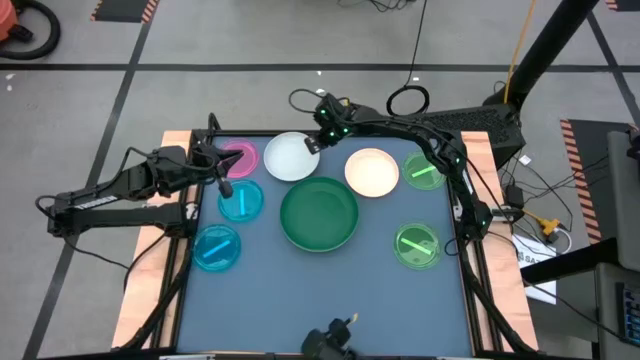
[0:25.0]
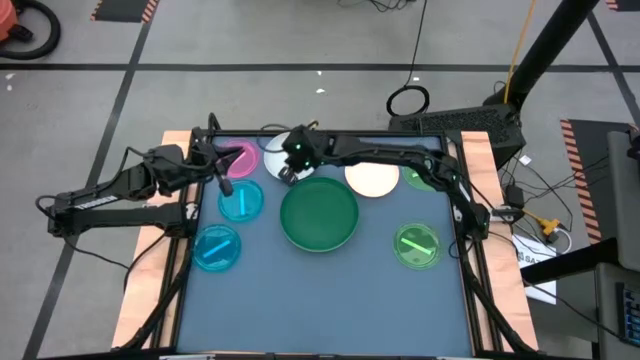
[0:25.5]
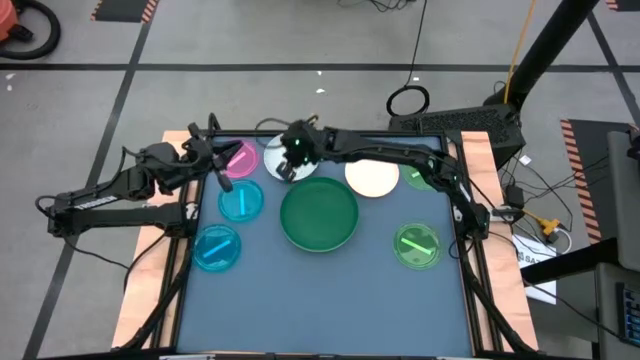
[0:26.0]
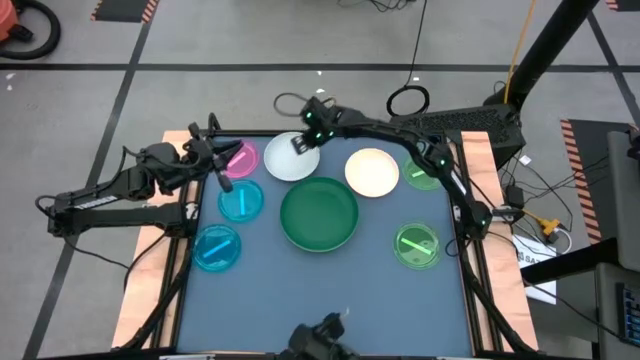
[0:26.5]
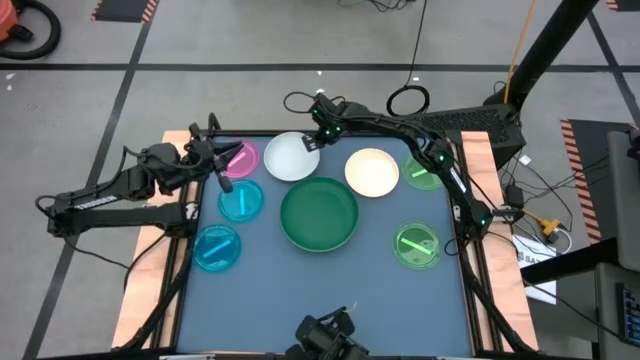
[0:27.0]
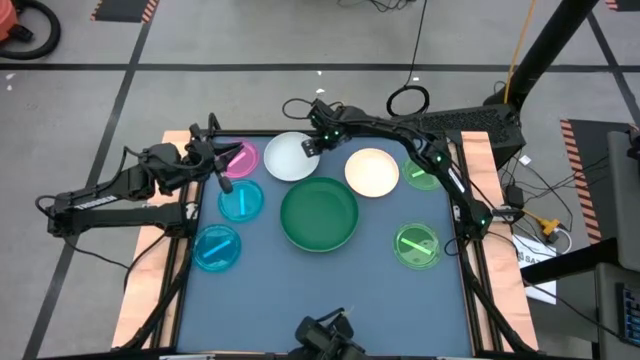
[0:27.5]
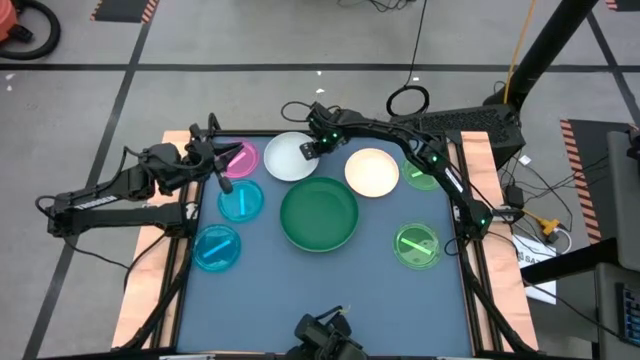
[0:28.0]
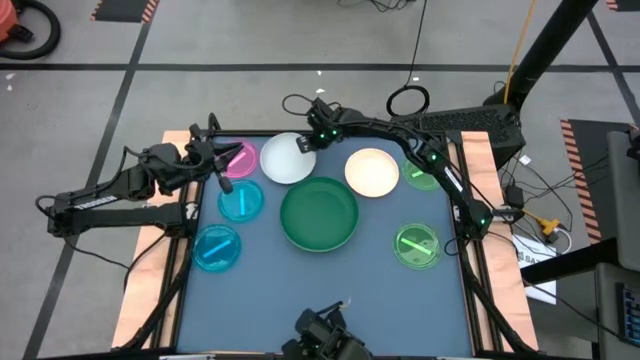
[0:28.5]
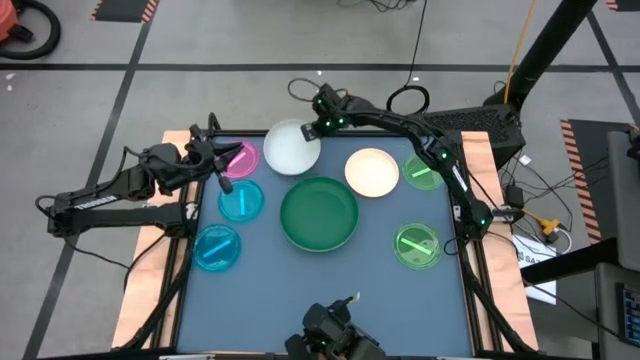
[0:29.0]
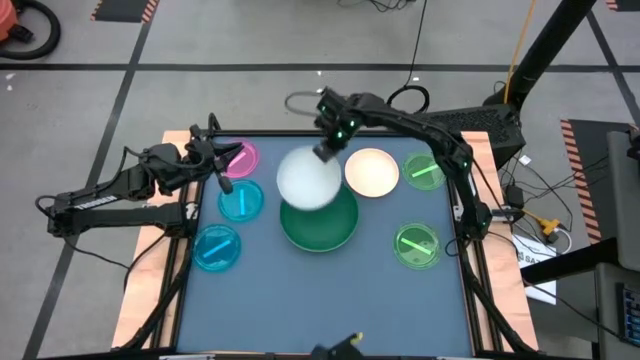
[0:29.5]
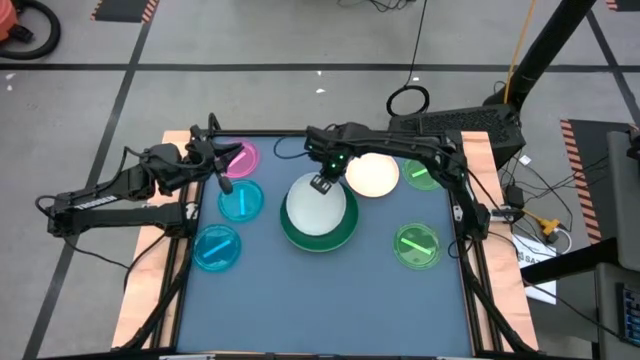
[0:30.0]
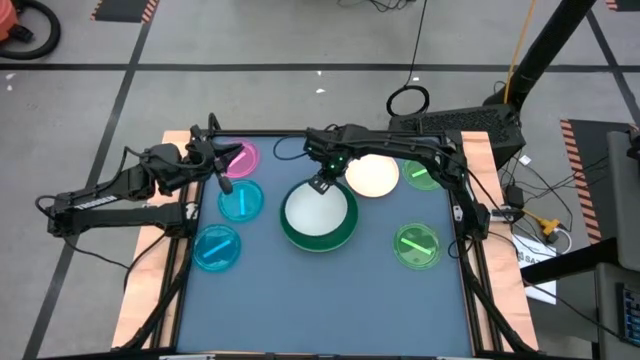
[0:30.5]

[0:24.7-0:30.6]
Task: Stack plastic plates
Stack the gray plate on top of the green plate

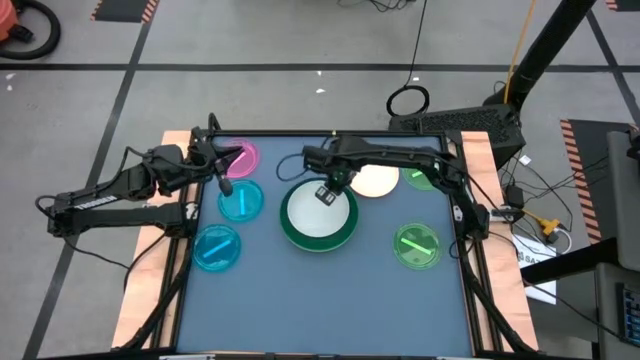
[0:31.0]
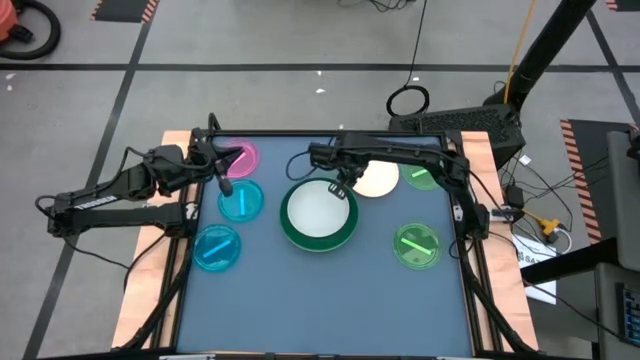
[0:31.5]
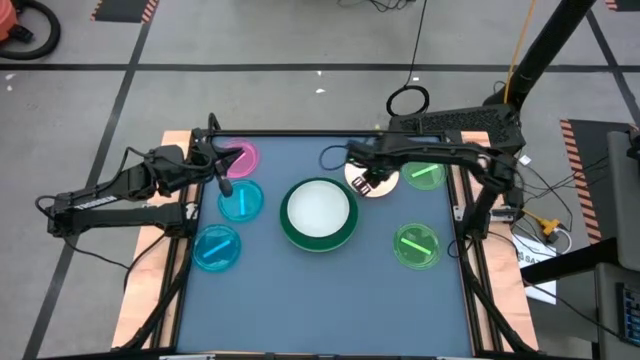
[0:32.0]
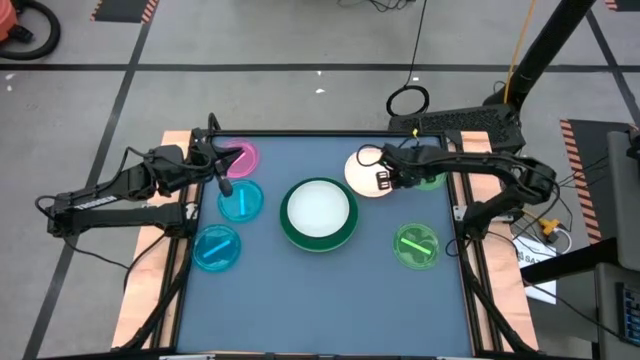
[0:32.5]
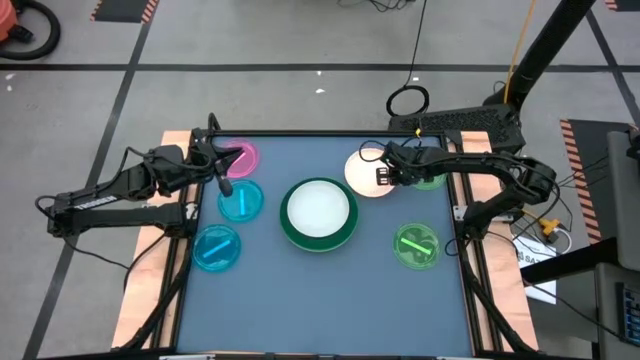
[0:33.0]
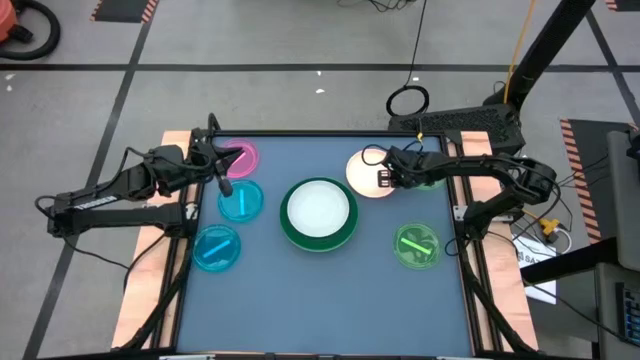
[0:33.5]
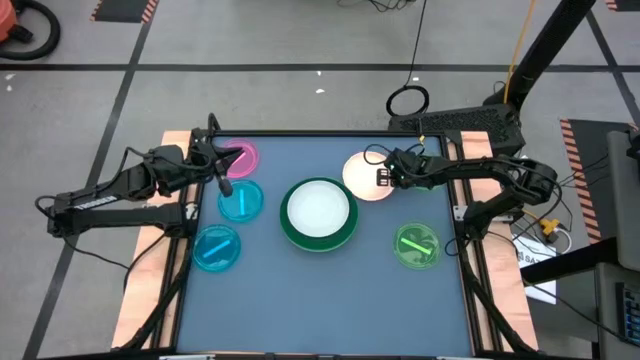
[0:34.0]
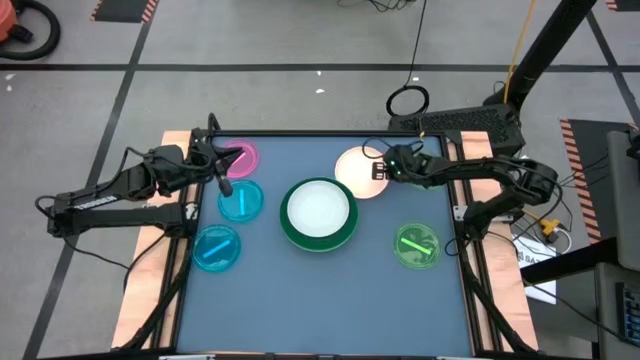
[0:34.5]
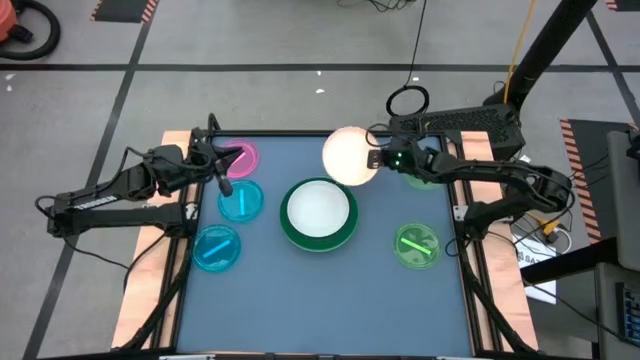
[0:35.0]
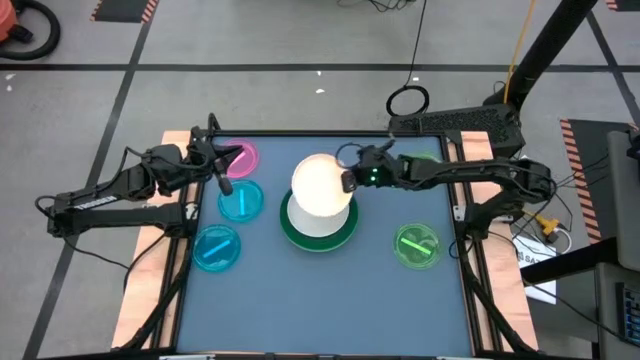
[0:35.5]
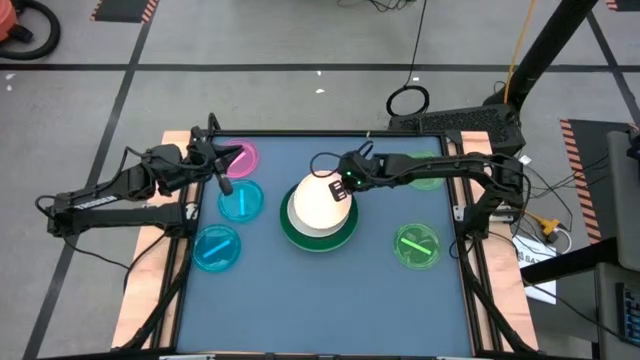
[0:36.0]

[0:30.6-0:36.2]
Stack the light brown plate on top of the gray plate

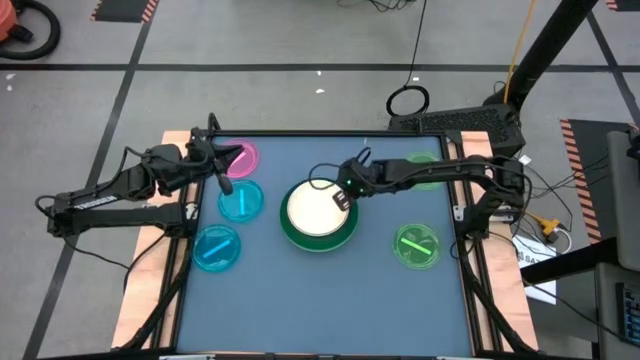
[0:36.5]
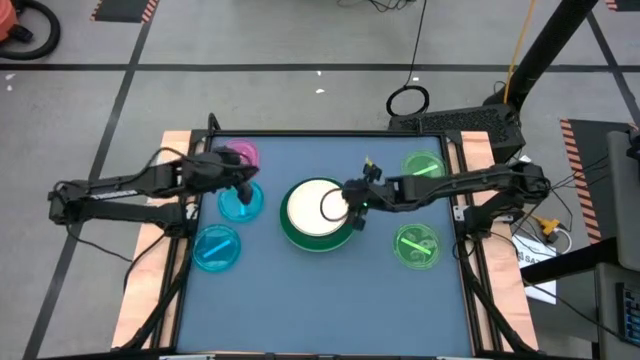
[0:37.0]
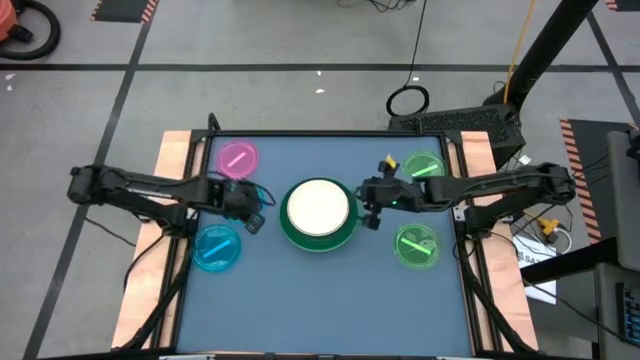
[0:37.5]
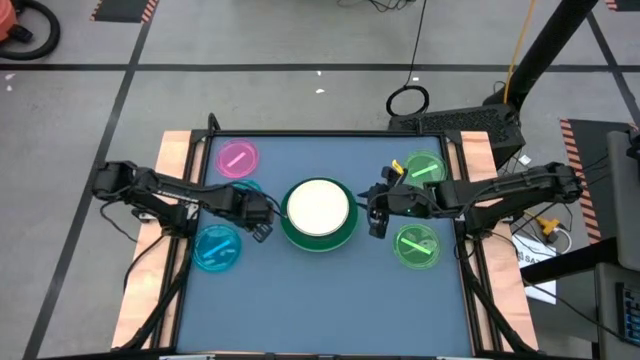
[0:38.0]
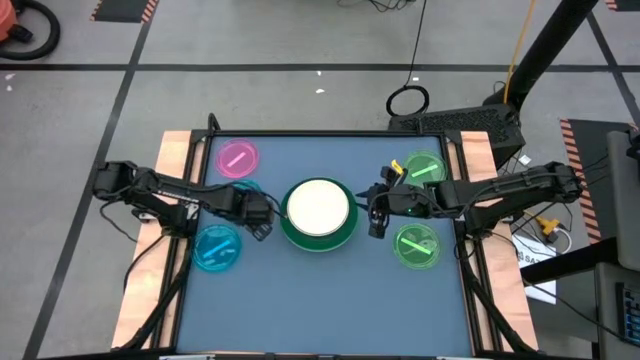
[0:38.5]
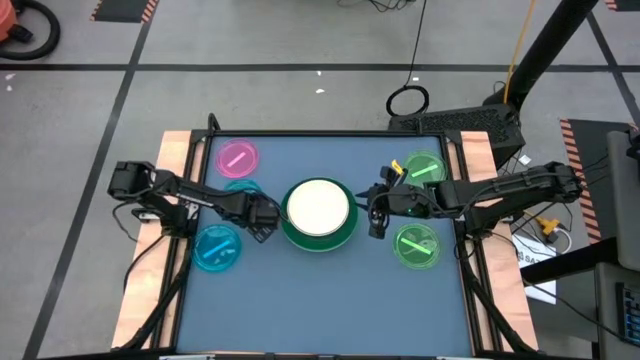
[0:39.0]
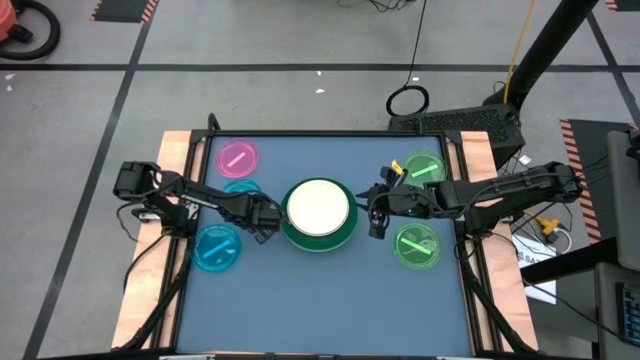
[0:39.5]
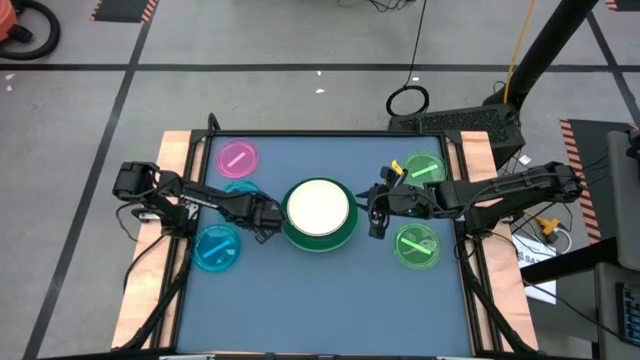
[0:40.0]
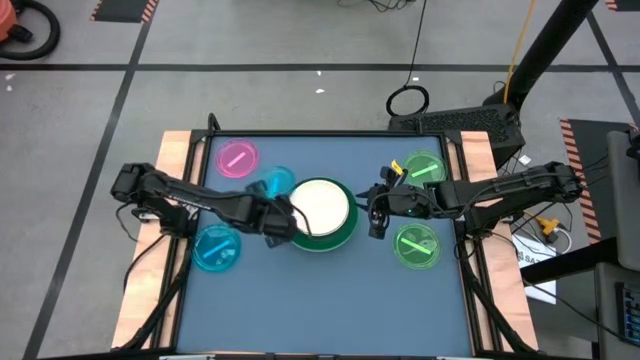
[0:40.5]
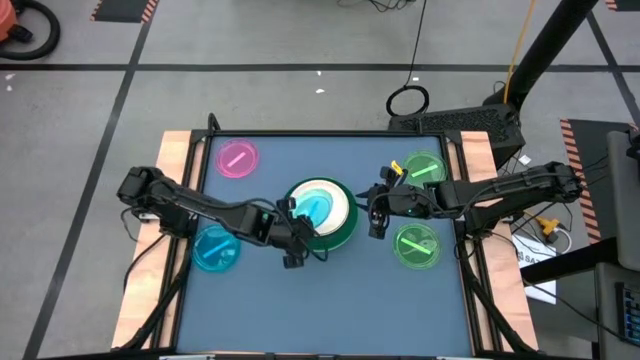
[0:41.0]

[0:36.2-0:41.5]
Stack the top transparent blue plate on top of the light brown plate

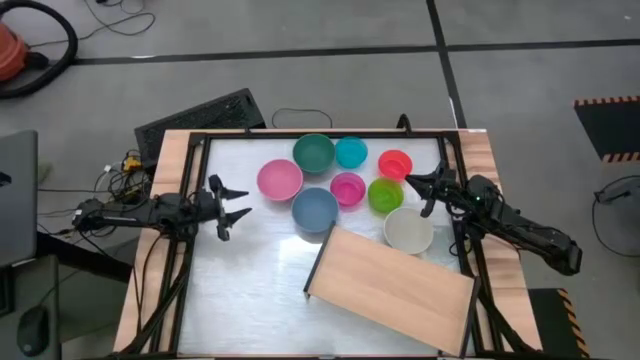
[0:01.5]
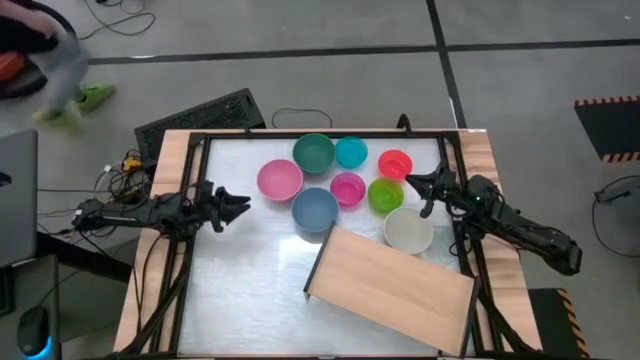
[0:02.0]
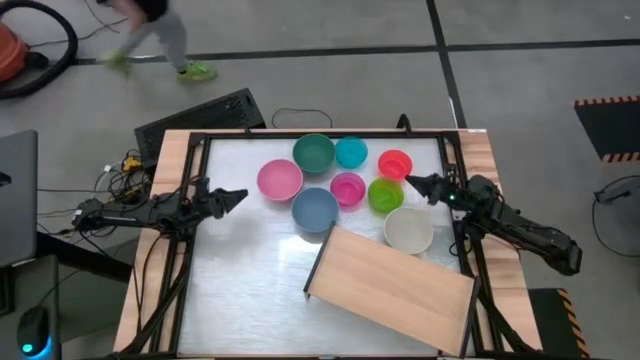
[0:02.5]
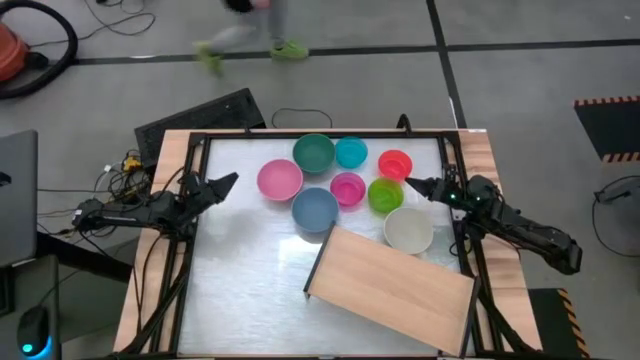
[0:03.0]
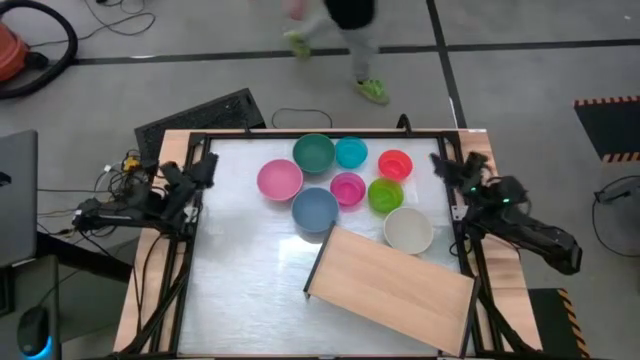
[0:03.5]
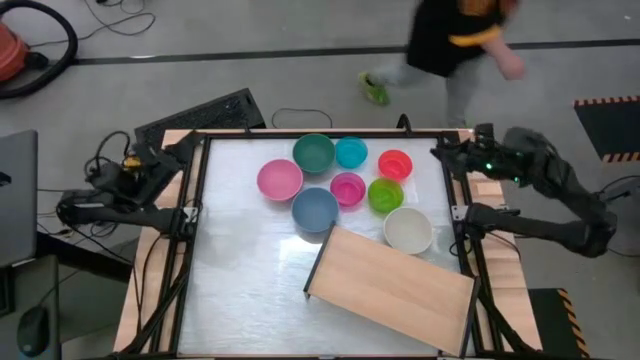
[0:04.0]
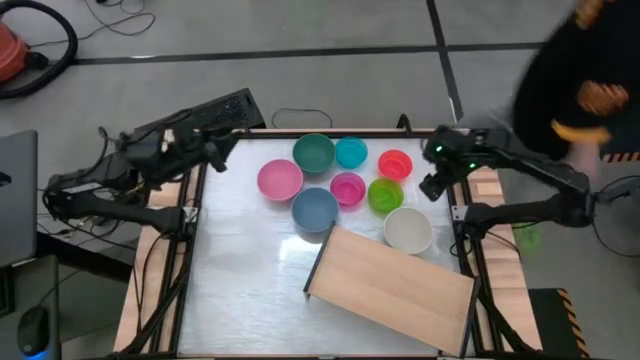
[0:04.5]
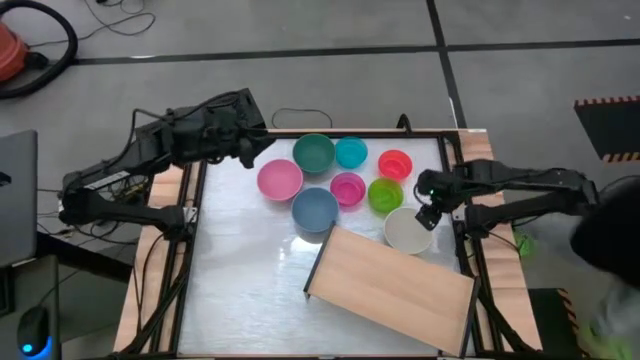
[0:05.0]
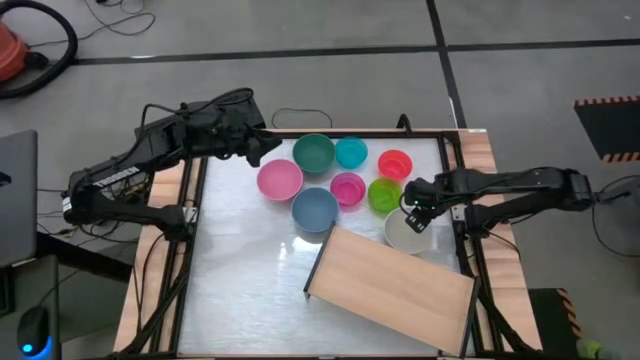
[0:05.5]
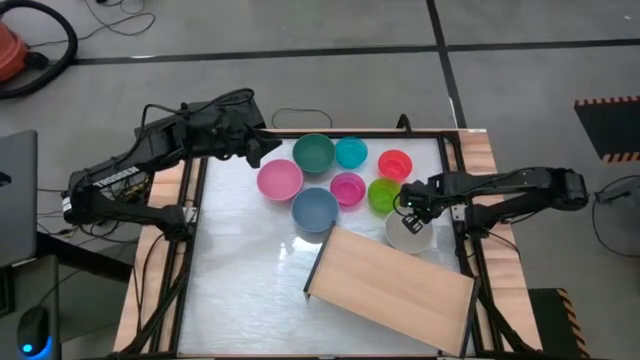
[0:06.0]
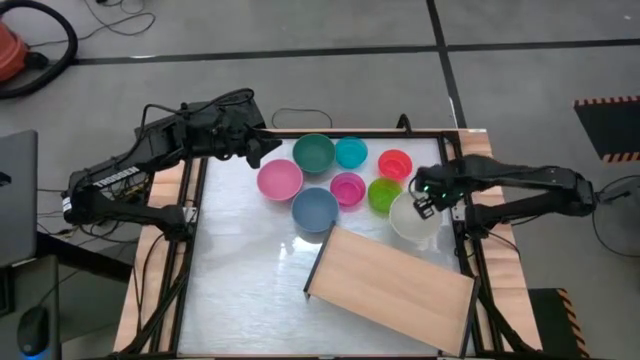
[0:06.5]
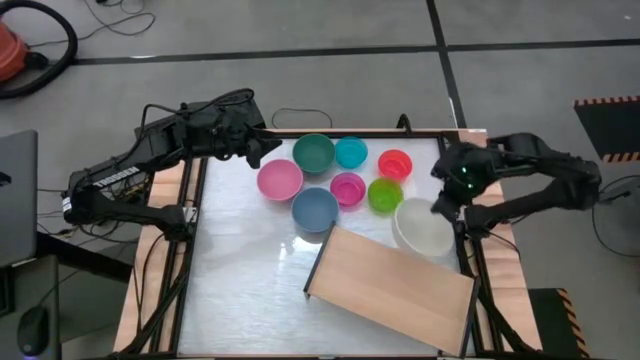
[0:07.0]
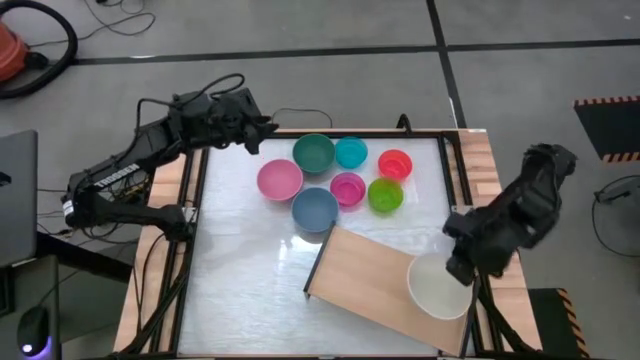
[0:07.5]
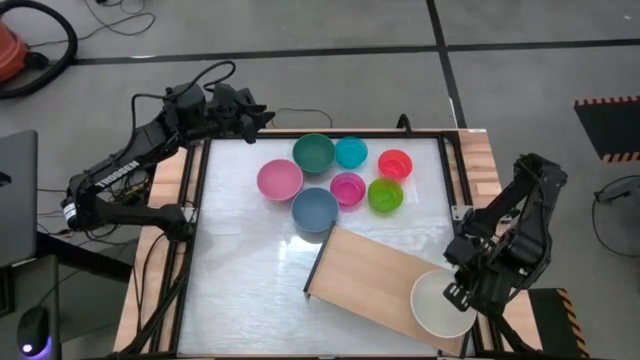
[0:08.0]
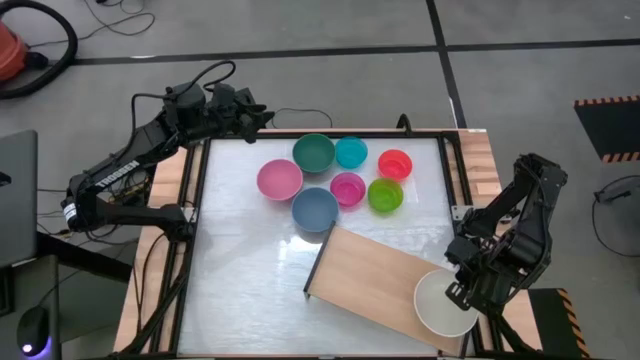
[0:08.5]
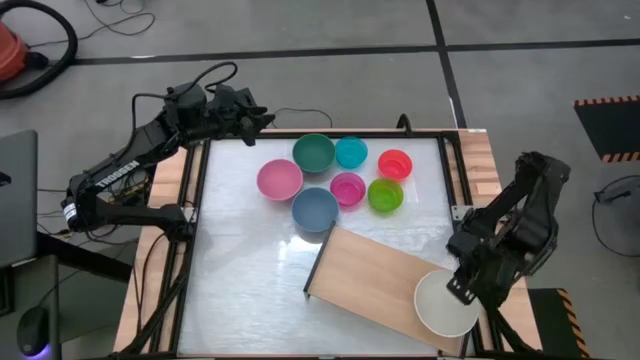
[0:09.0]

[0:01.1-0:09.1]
Task: Place and stack bowls onto a shelf
Put the light gray bowl on the shelf
